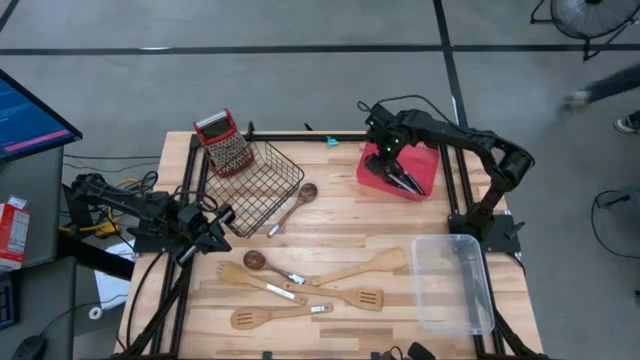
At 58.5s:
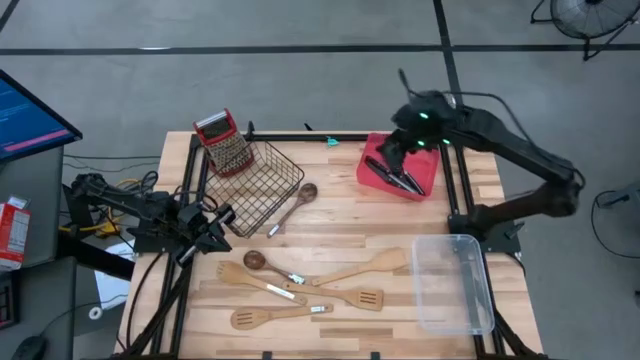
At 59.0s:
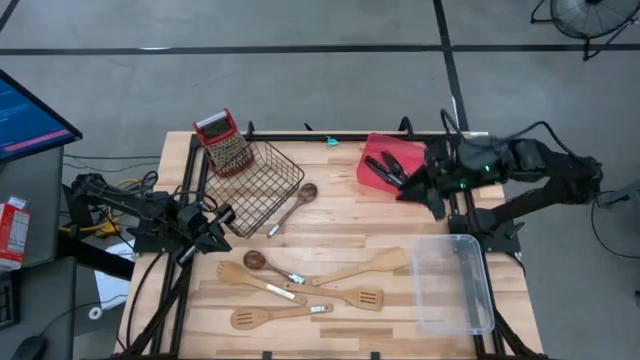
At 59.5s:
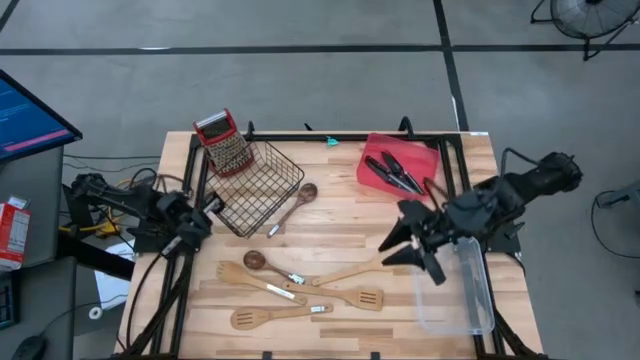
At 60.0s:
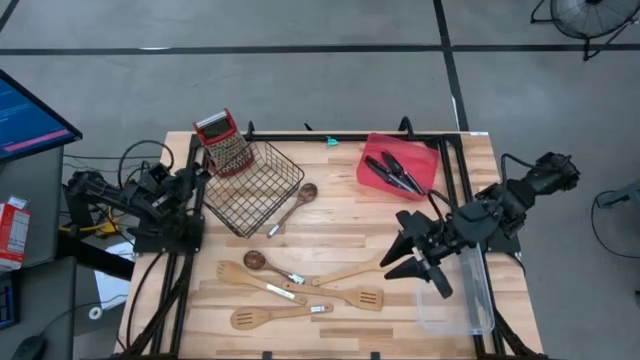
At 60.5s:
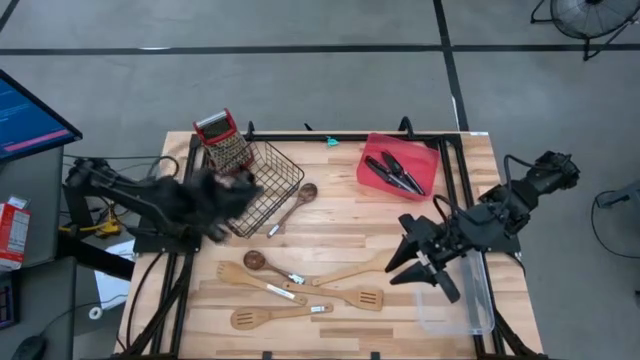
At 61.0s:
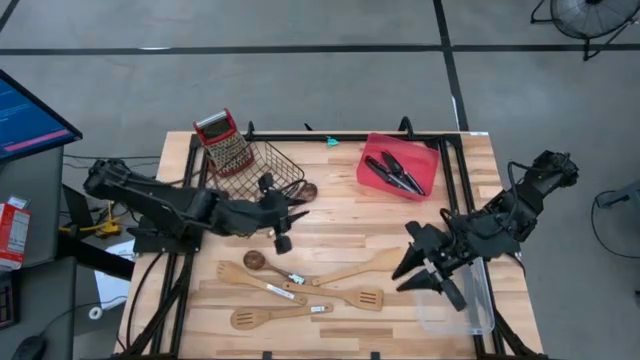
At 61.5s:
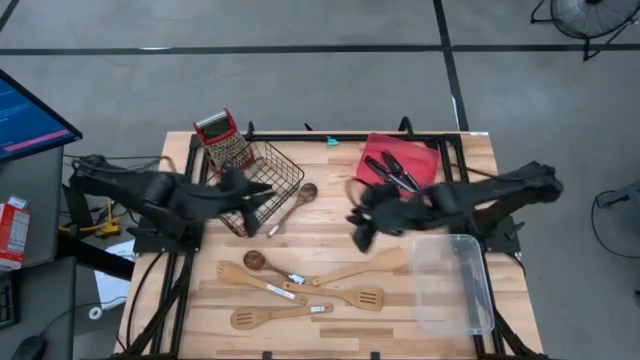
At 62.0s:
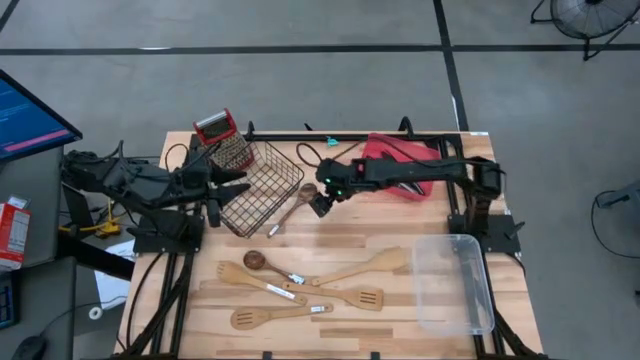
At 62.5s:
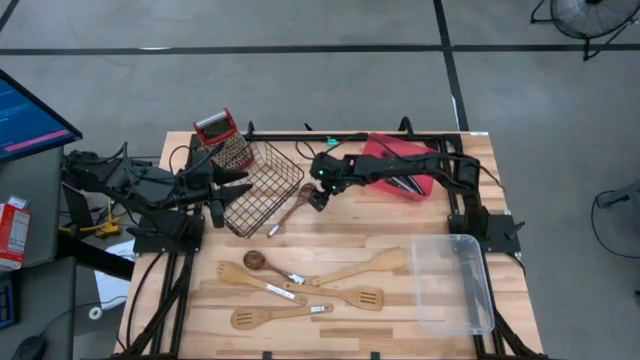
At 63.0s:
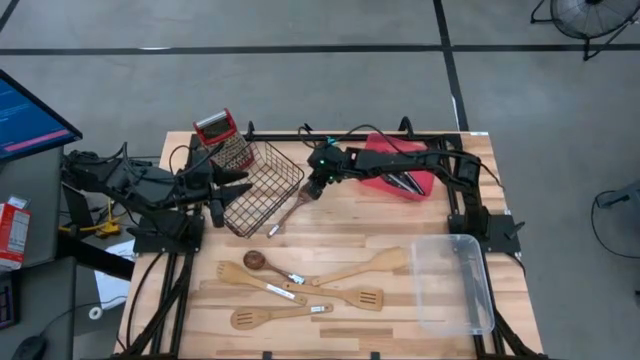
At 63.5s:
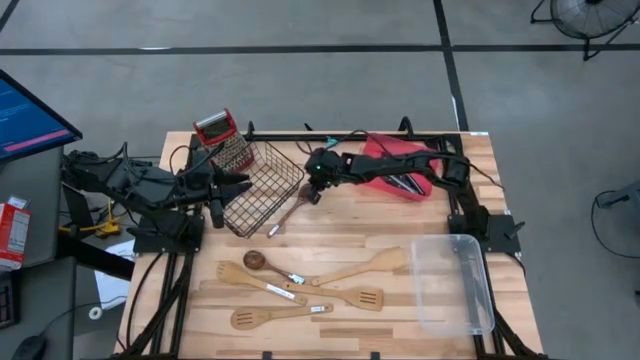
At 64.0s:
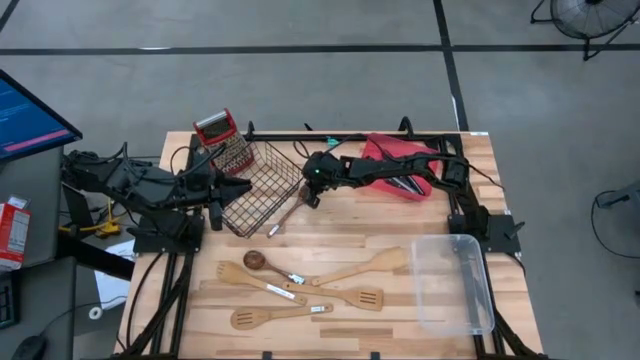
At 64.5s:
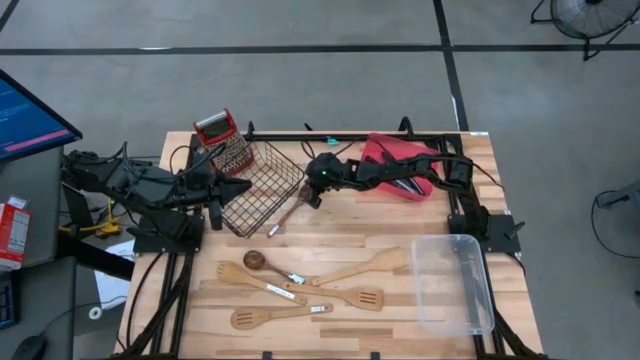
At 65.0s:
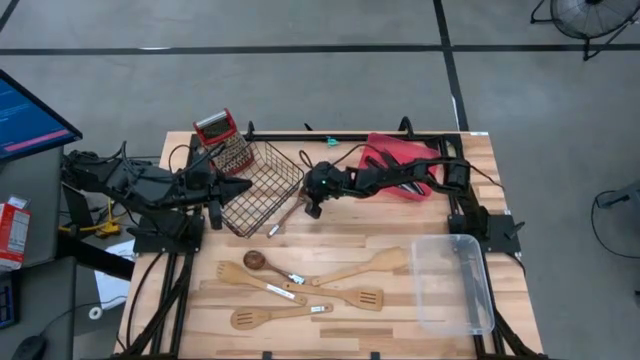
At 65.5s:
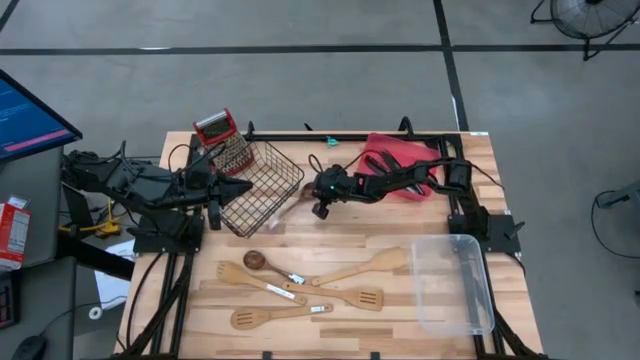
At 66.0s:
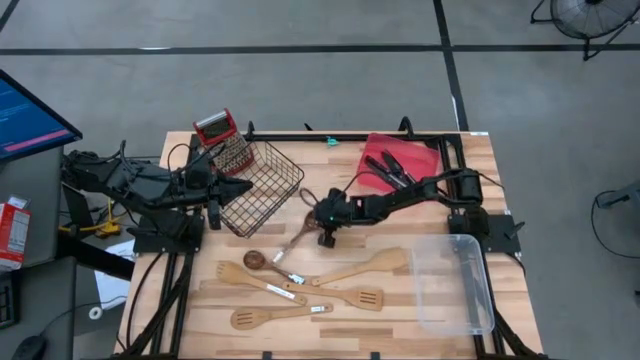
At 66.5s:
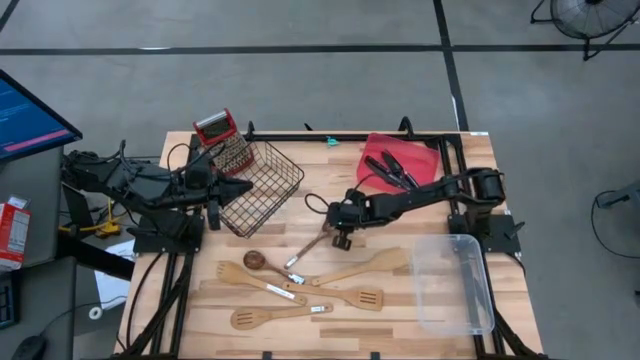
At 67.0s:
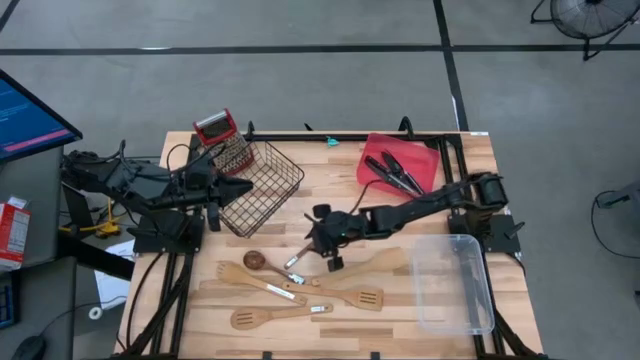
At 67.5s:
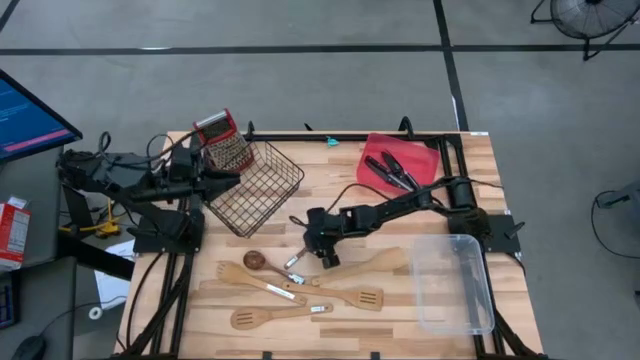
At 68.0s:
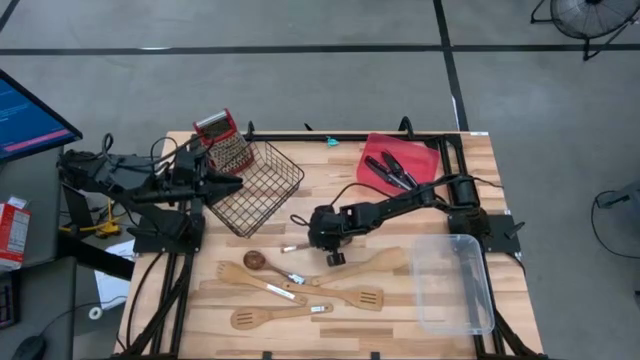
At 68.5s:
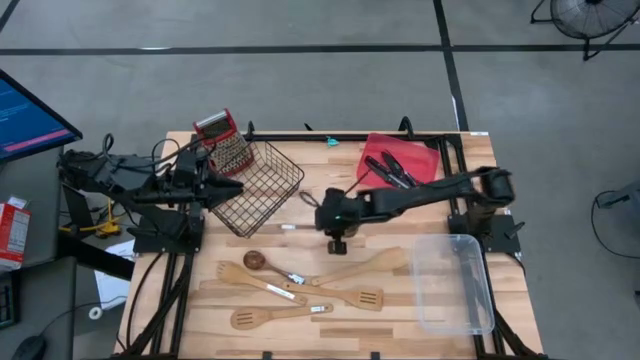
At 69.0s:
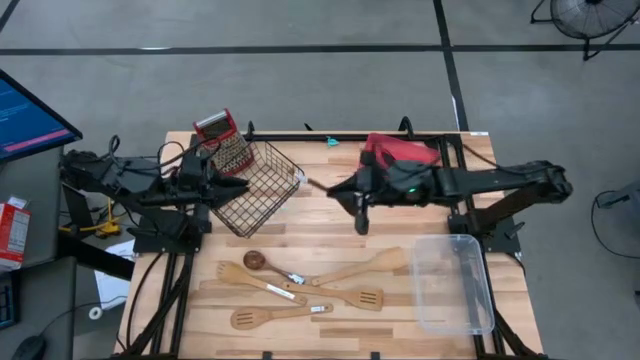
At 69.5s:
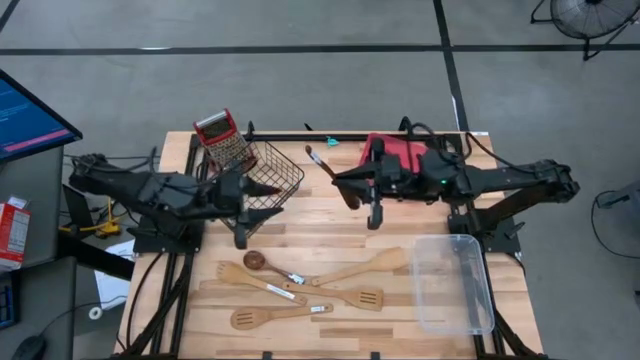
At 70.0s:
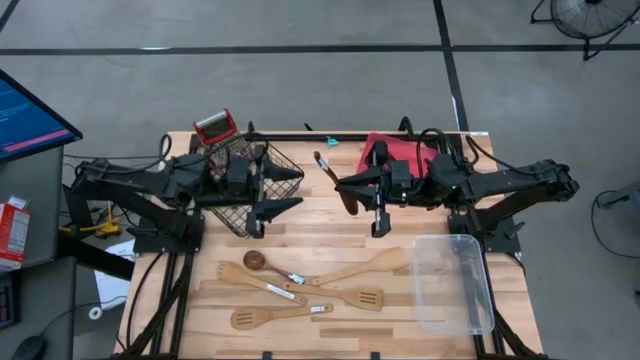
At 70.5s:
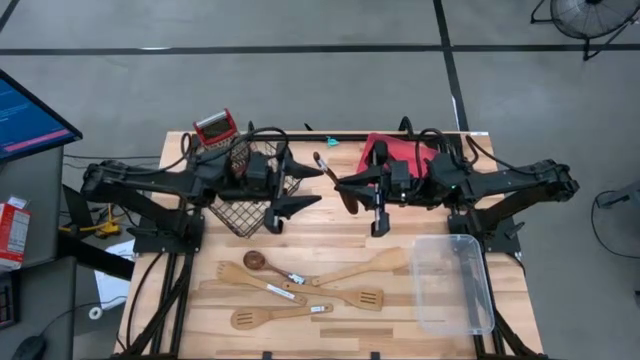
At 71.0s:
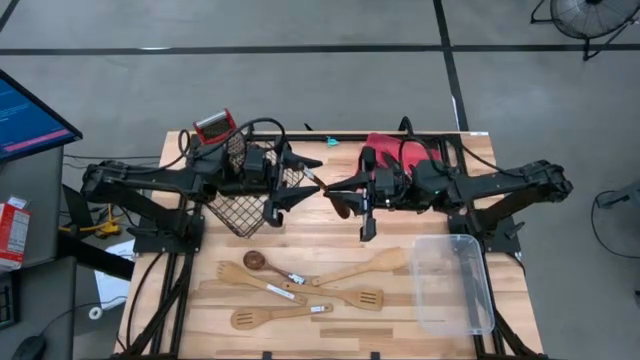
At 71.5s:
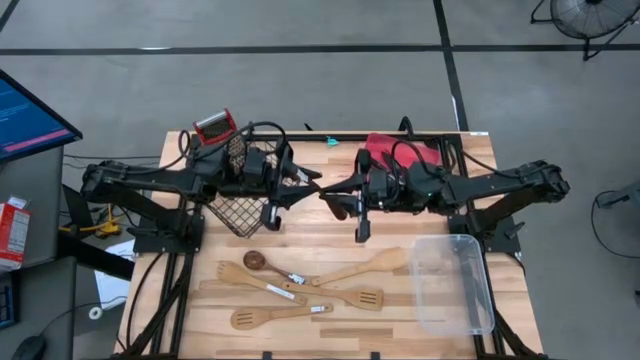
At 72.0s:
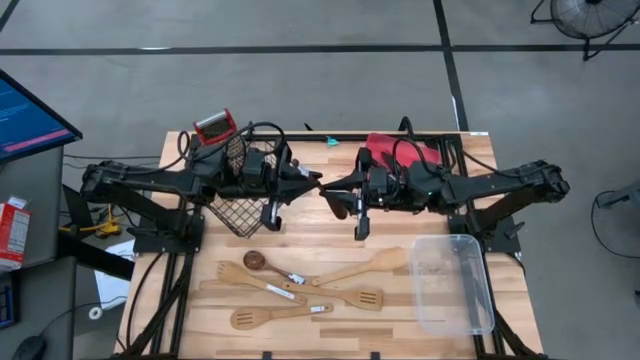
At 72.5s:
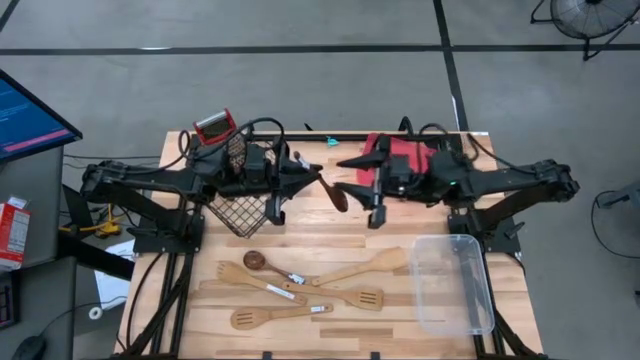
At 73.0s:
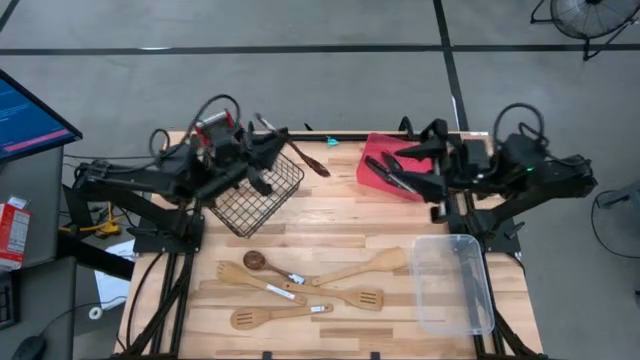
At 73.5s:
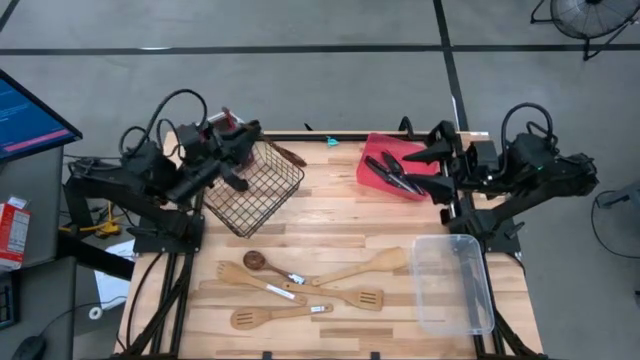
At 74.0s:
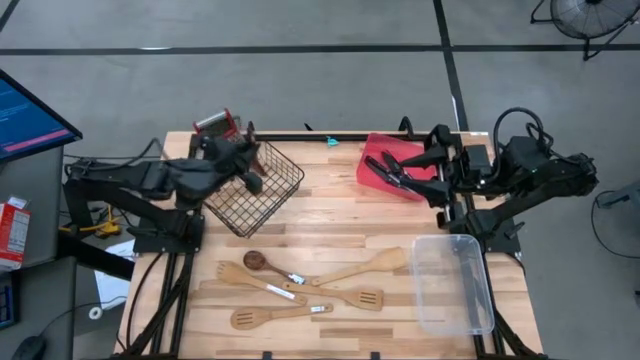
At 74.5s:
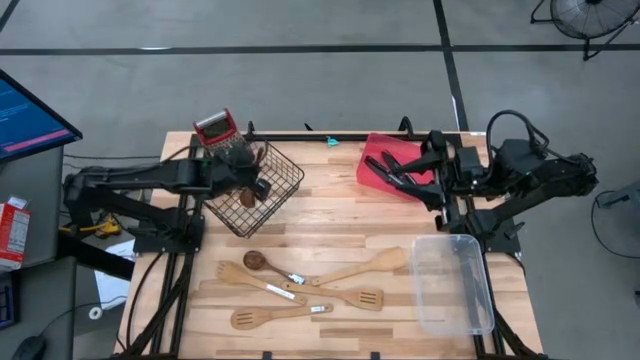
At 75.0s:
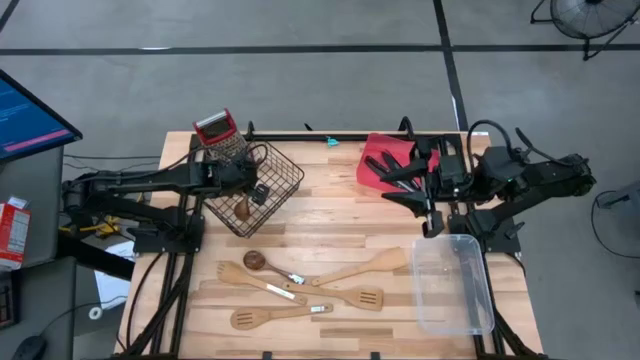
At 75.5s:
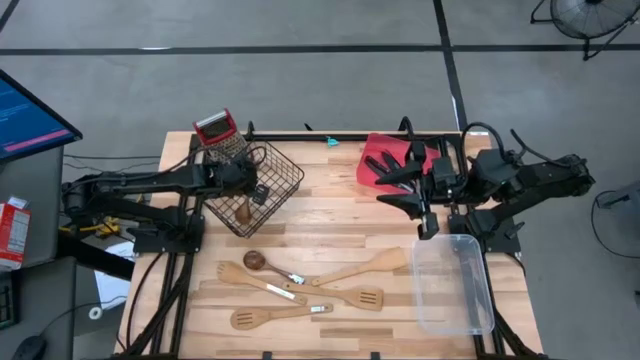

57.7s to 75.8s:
Task: Pick & Place Kitchen Items
Put the top dark brown serving spoon into the black wire basket

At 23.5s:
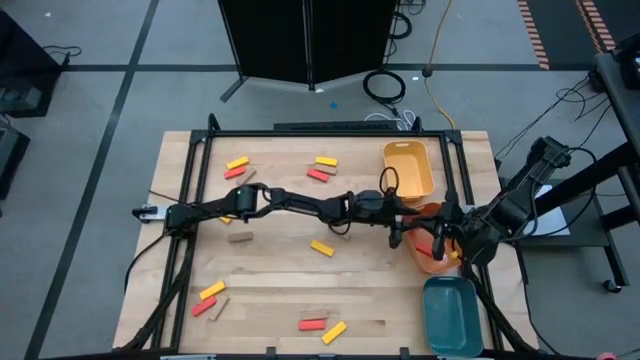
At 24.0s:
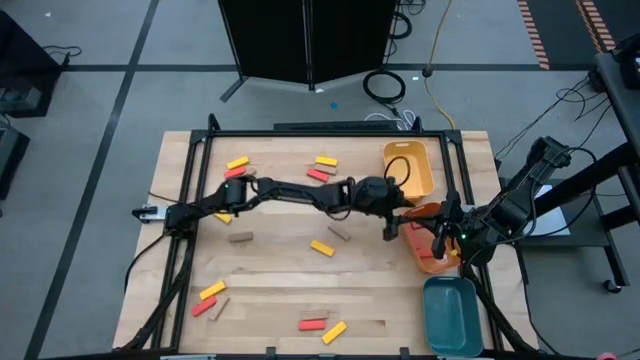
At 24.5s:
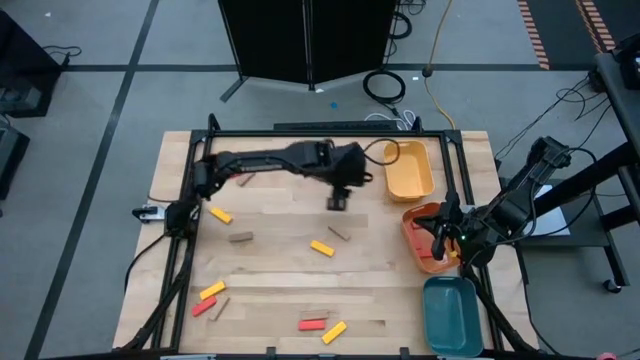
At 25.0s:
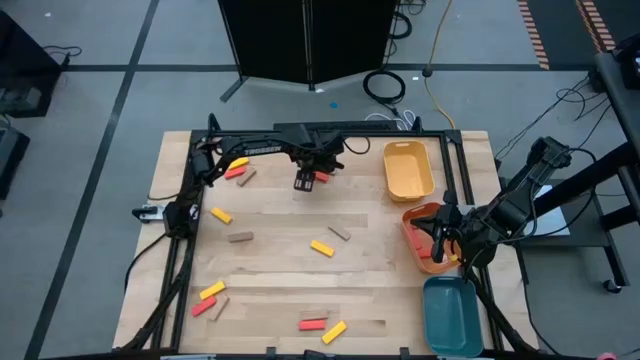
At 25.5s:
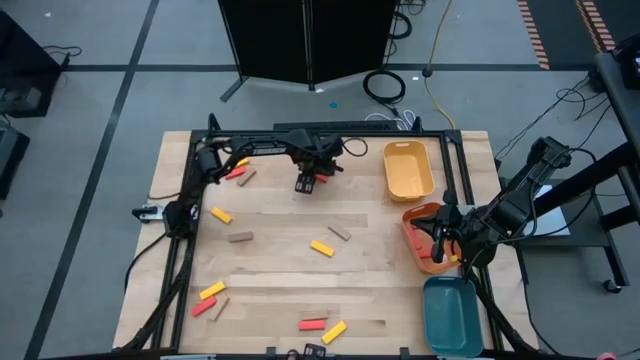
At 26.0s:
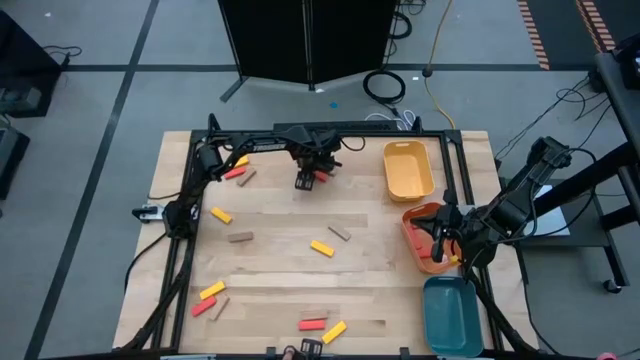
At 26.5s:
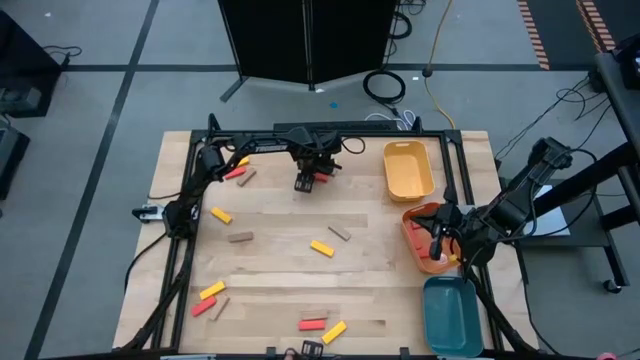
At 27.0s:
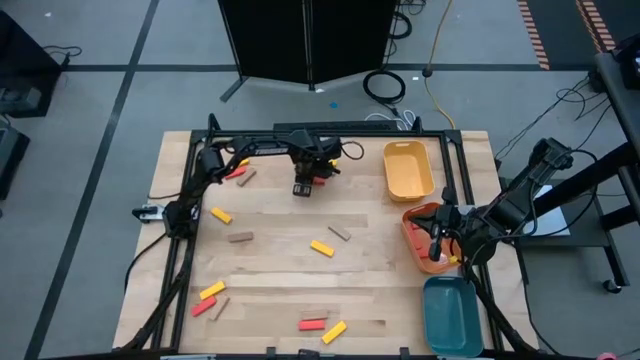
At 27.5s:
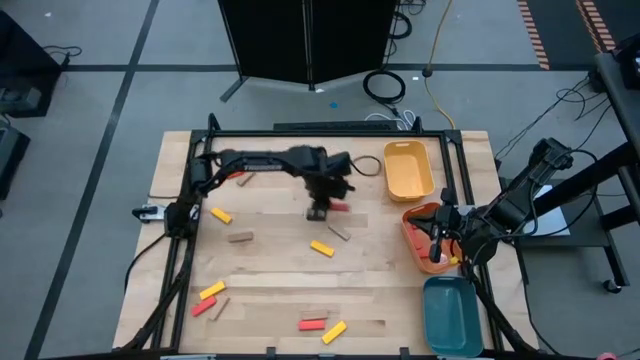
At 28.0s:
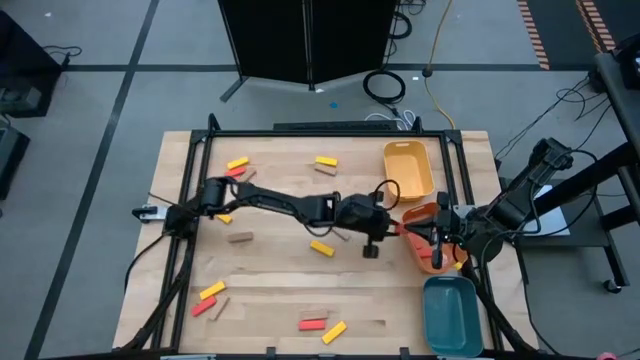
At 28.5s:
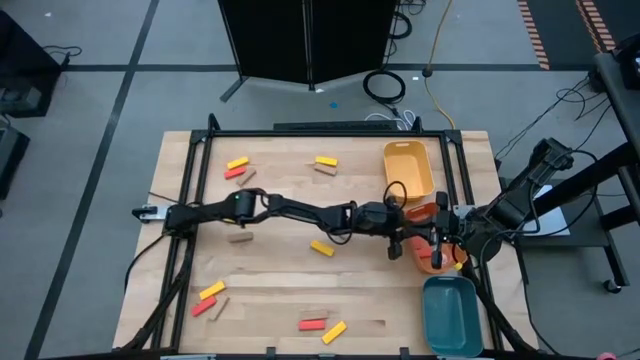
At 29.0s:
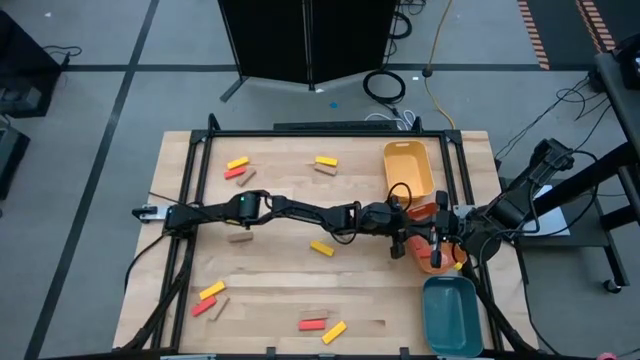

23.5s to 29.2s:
Task: Sort blocks
Put the red block into the orange bin
